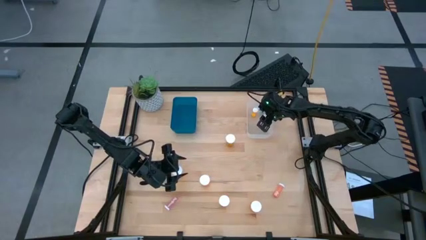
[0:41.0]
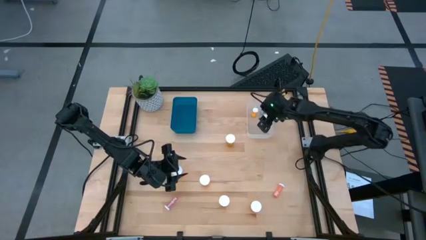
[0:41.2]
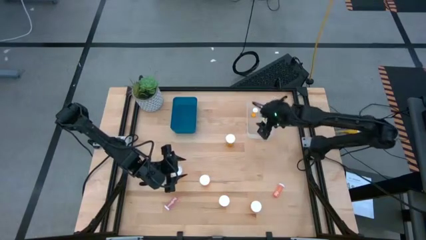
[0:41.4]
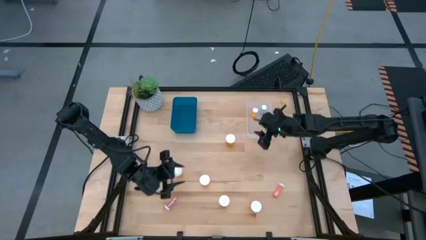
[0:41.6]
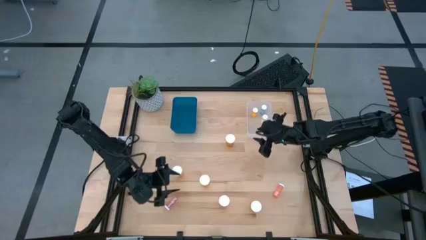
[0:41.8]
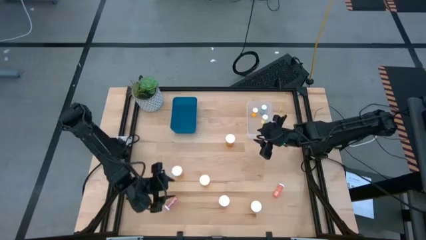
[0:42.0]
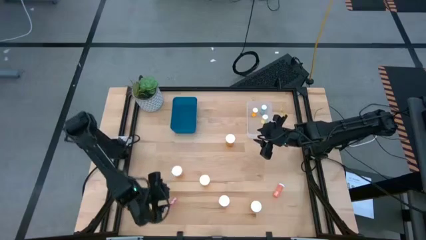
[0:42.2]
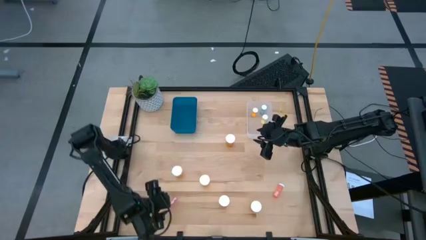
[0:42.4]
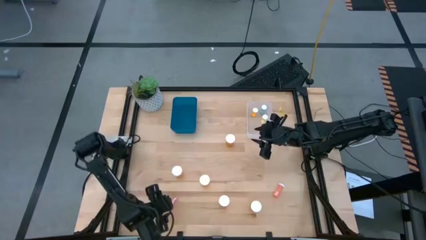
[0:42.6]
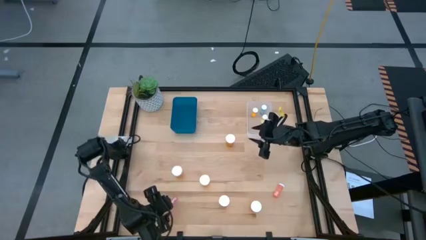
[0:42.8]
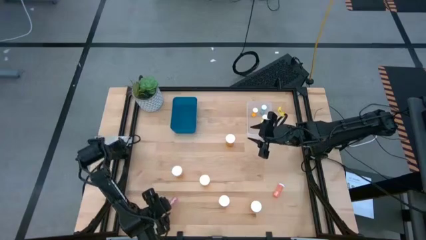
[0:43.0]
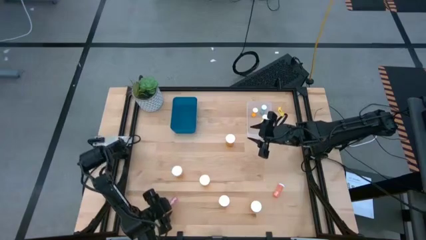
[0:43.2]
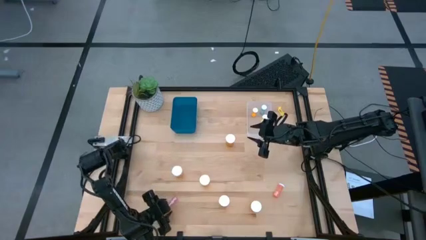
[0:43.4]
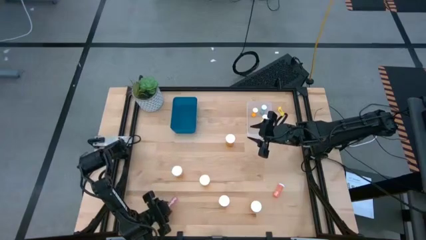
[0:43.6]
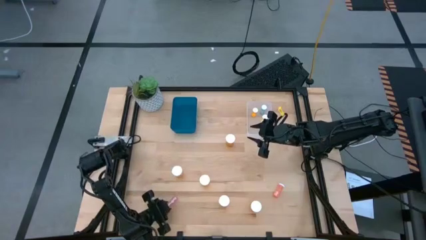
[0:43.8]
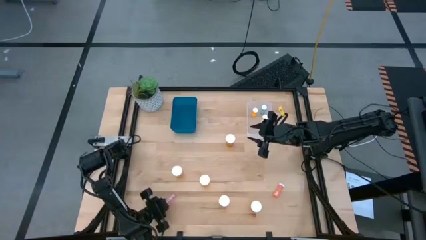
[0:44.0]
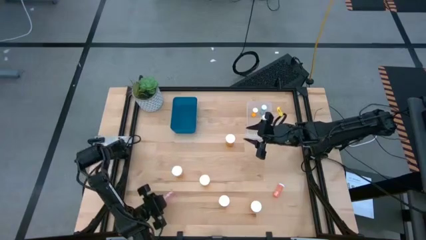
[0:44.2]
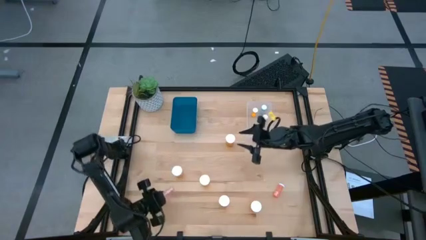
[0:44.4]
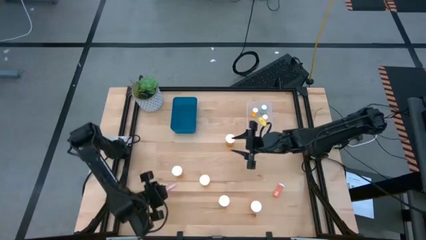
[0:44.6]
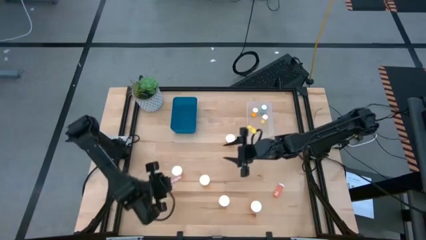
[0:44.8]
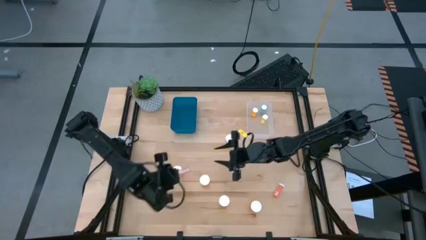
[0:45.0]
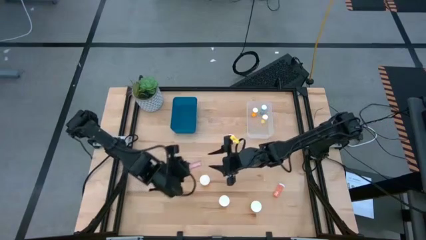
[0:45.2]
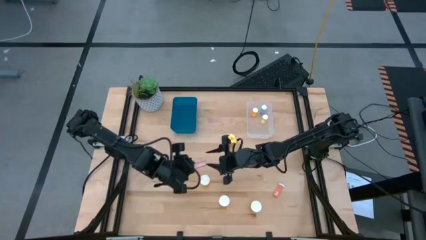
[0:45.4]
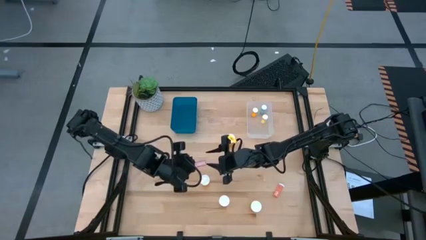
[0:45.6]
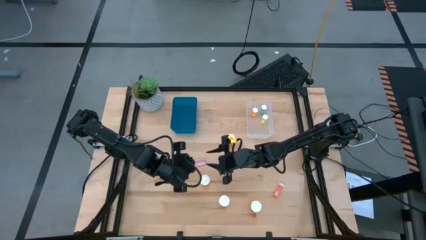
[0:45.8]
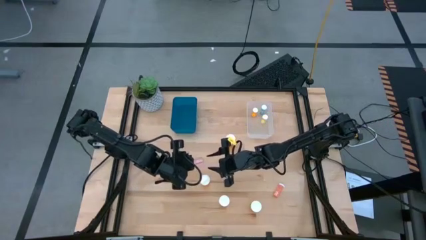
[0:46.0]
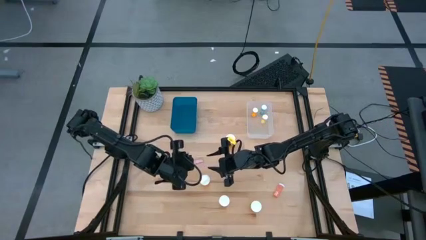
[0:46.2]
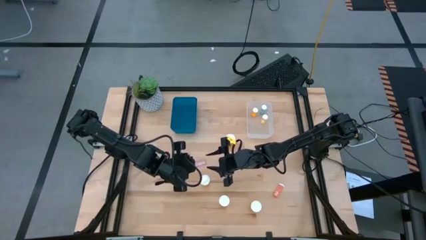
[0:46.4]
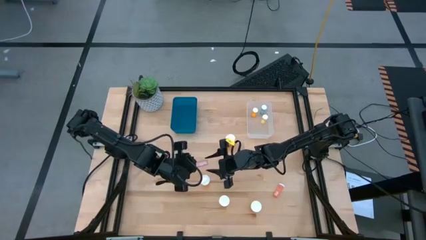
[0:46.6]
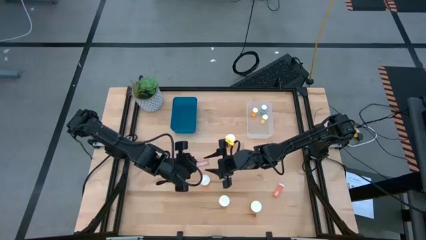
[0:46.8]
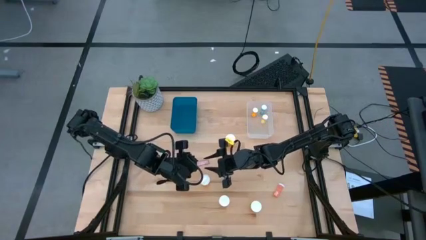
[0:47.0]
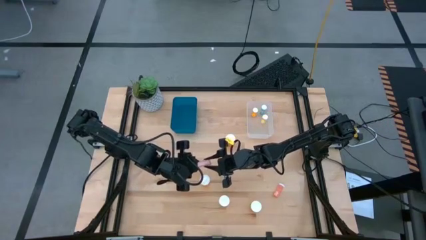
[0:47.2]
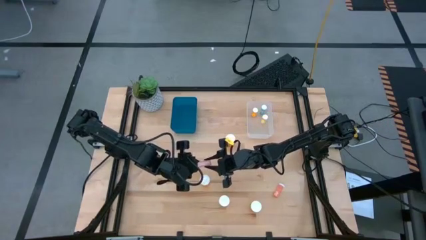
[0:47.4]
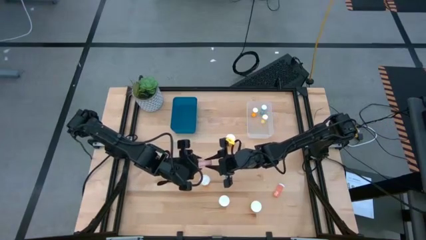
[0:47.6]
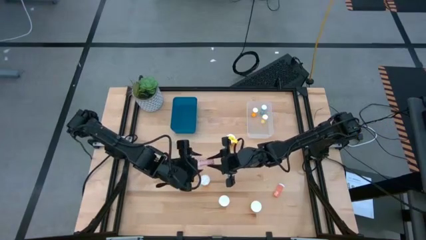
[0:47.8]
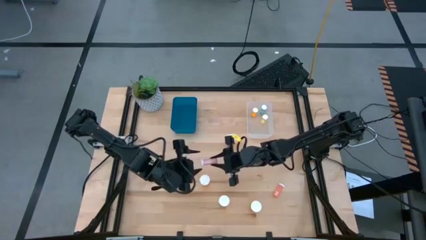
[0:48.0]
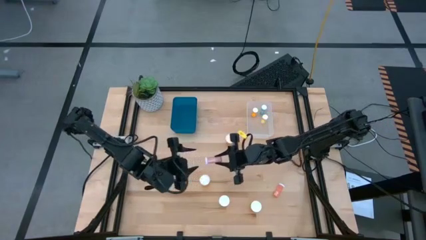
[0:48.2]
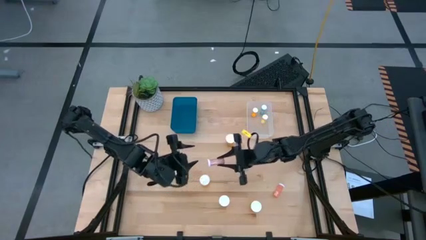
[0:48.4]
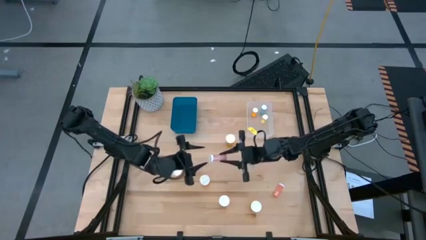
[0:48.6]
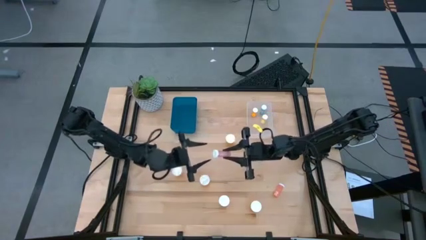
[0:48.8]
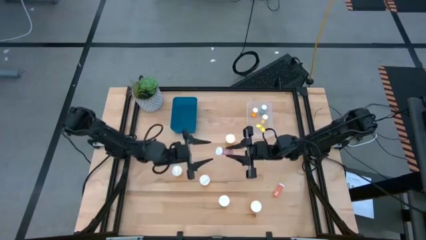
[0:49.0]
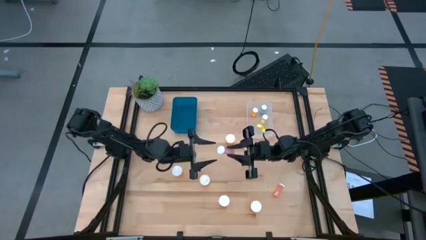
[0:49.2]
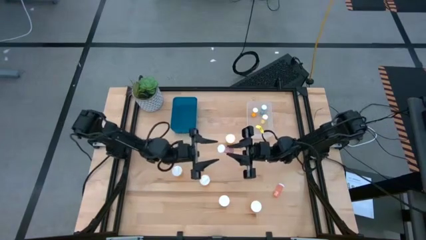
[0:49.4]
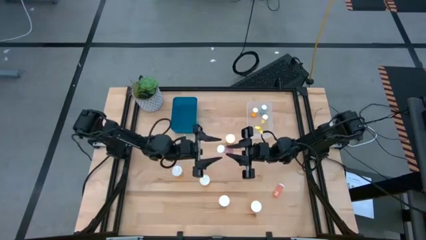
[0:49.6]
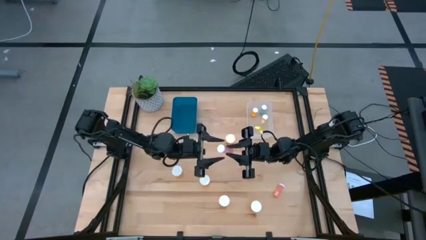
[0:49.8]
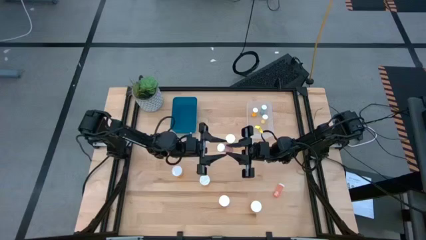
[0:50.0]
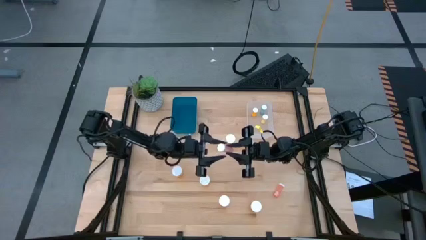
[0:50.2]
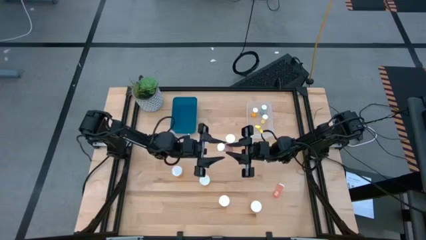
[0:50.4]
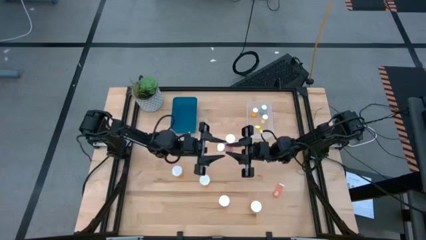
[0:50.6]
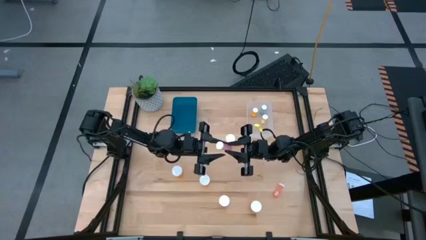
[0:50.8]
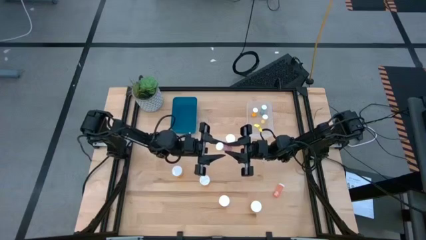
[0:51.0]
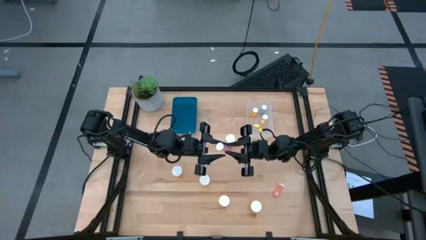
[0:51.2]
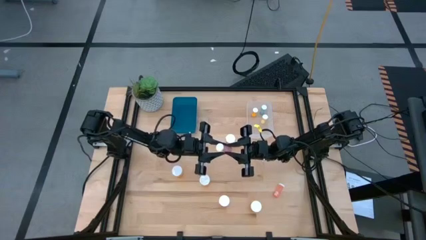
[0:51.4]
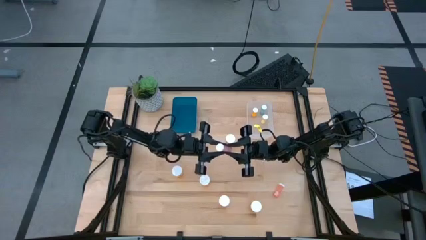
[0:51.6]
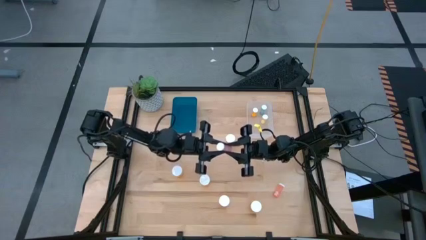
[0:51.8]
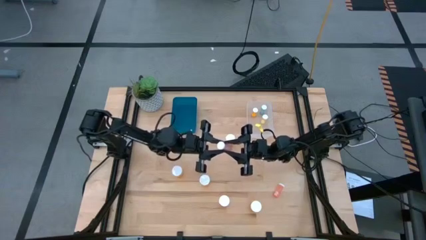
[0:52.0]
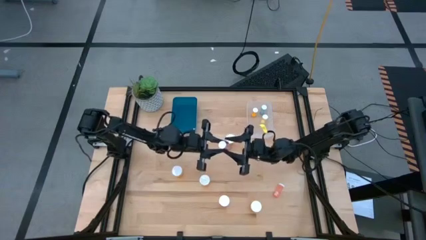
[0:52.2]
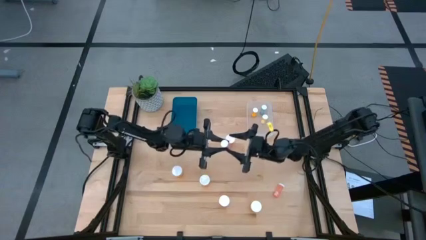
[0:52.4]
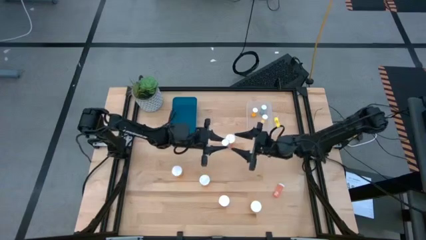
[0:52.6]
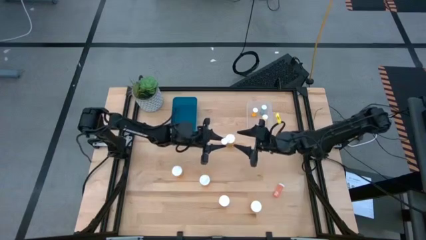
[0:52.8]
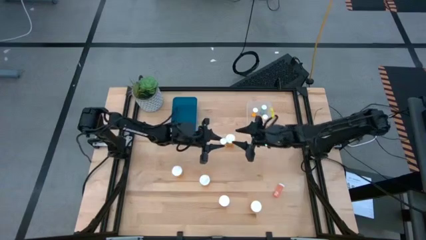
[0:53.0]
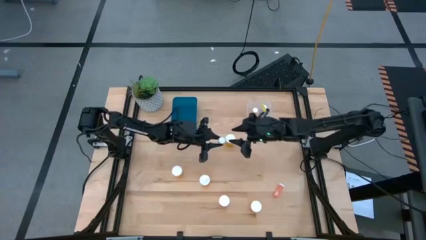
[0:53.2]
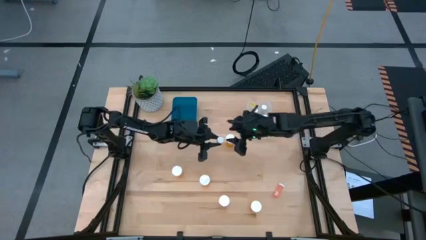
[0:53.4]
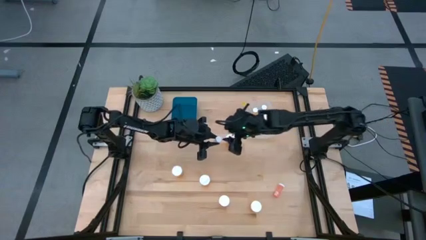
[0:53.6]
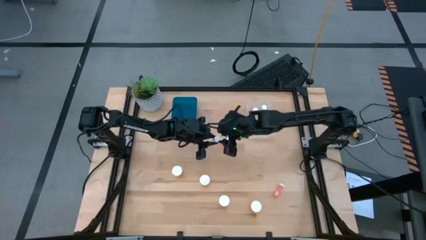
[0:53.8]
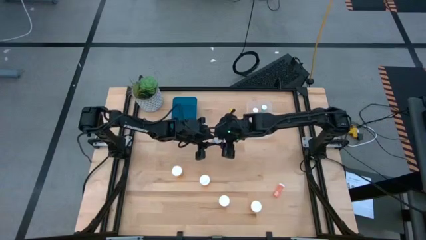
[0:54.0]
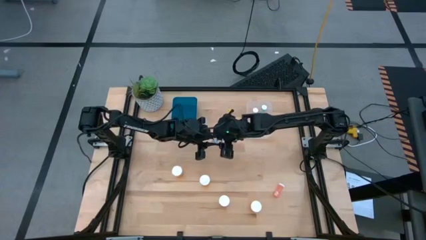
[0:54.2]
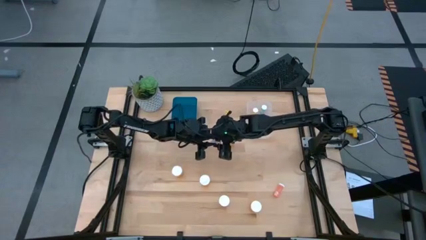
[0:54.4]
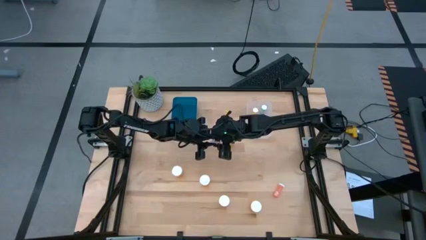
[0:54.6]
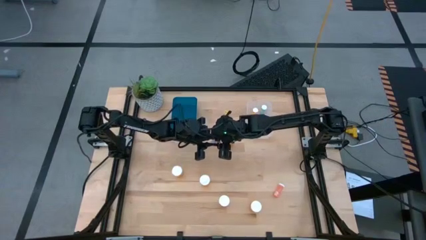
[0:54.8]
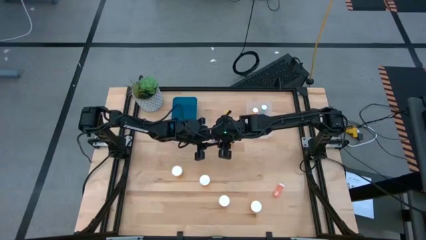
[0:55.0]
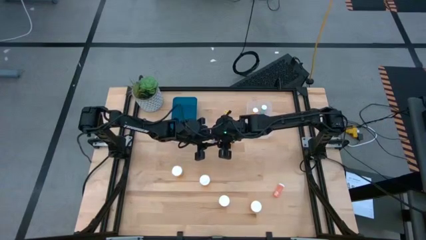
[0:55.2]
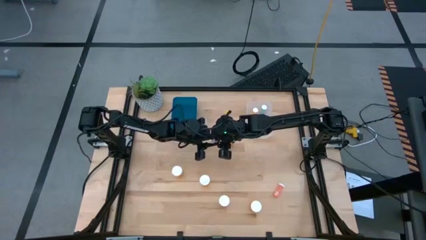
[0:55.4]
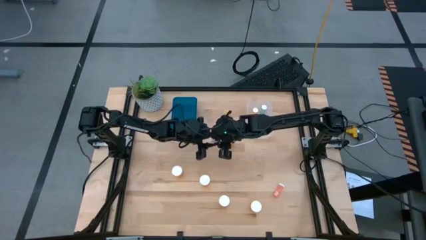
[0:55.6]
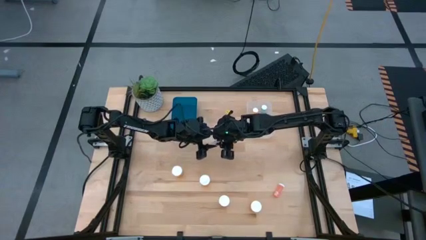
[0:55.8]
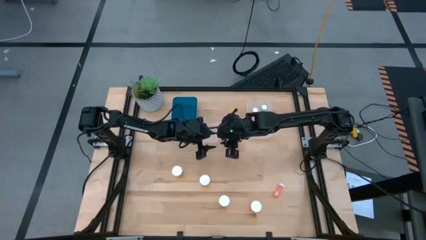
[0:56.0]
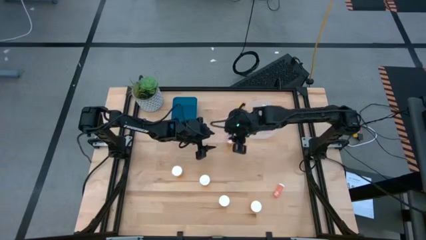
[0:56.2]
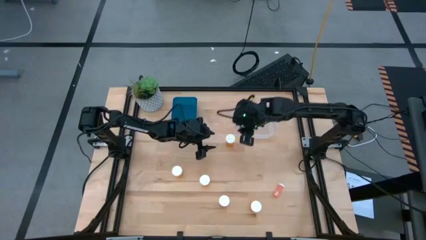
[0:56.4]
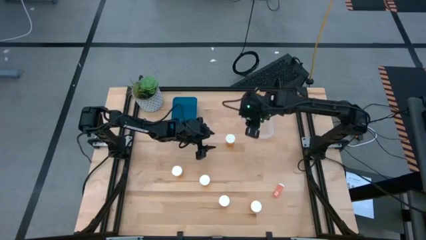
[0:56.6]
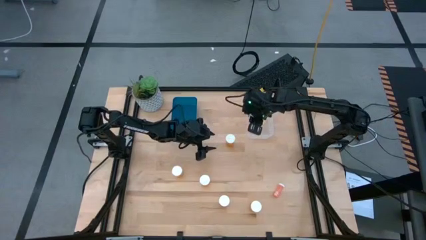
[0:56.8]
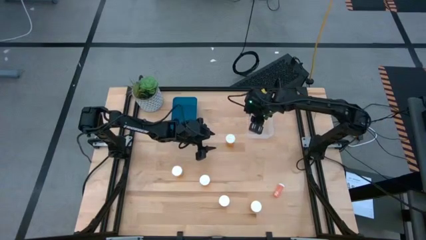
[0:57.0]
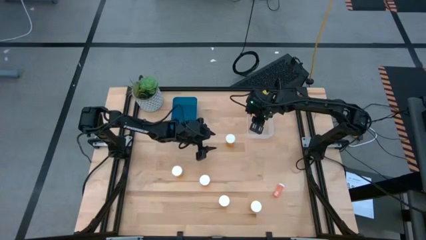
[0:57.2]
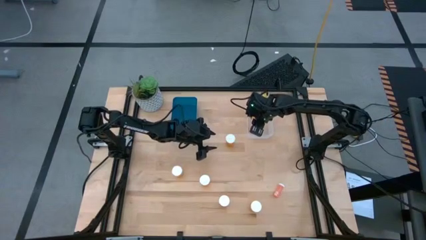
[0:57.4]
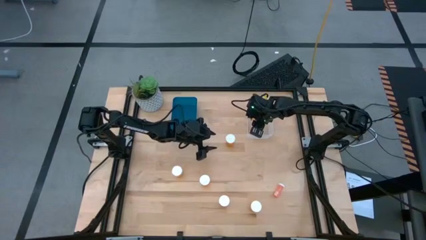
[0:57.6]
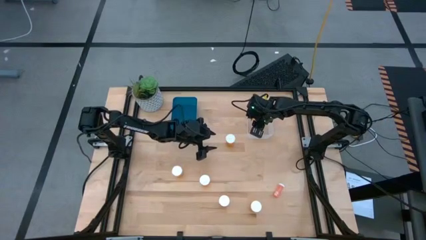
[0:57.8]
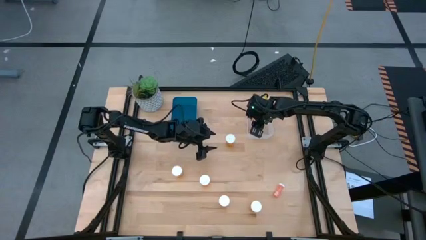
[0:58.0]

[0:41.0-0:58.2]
Task: Pick and place medicine bottles into bin by pill shape (circle, oval)
Put the small purple pill bottle into the transparent bin
